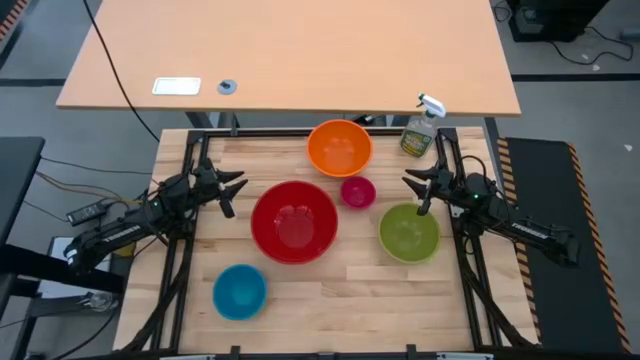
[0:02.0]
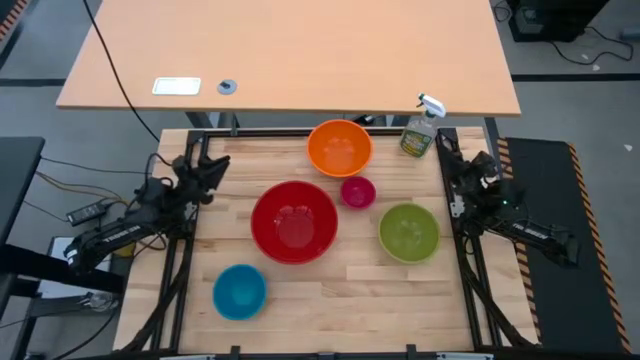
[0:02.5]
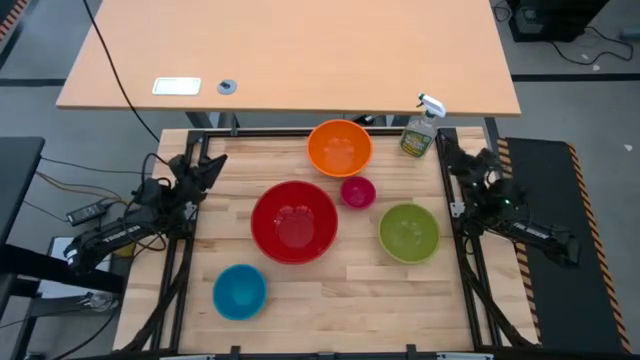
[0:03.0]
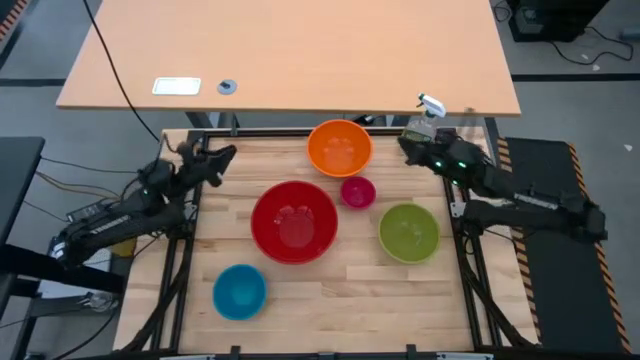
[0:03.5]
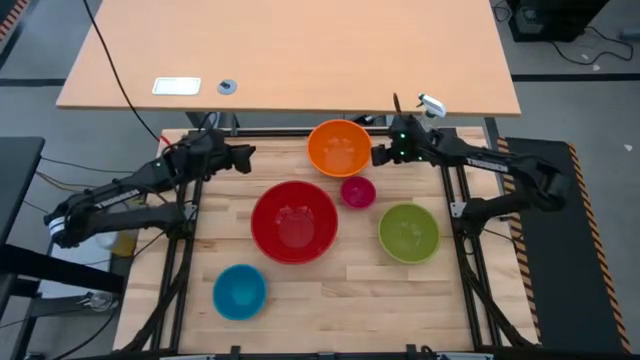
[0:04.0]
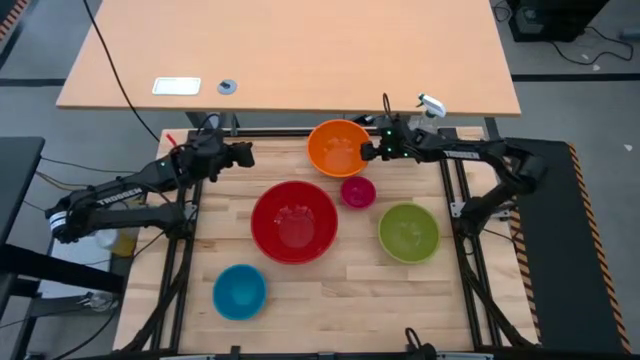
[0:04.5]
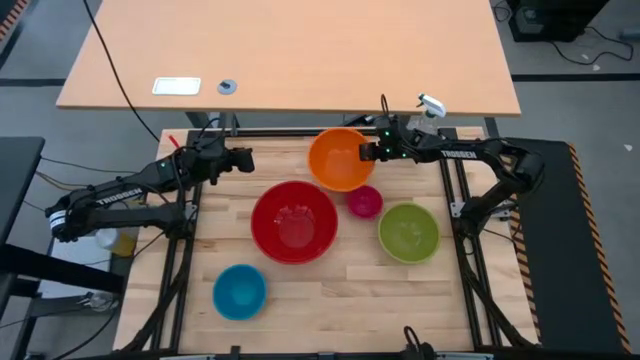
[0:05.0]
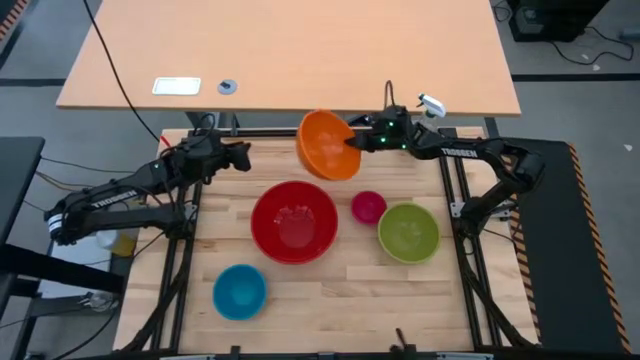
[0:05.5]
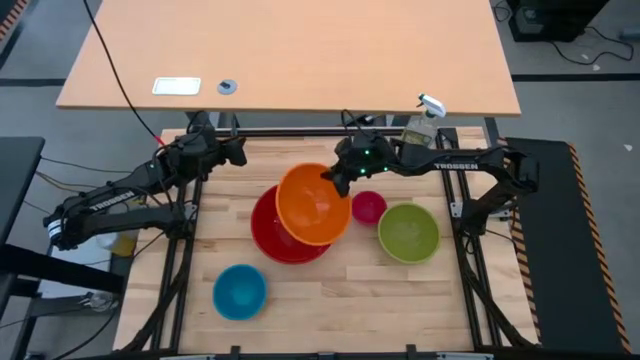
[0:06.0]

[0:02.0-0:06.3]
Stack the orange bowl on the red bowl

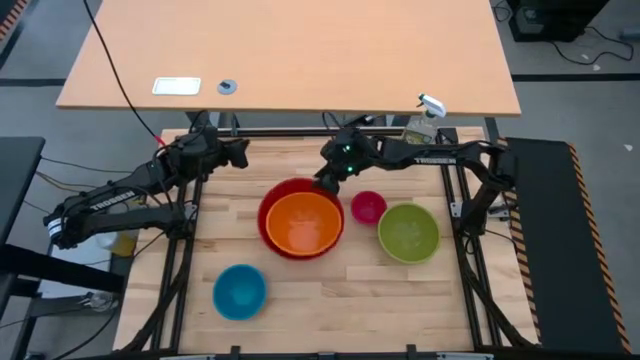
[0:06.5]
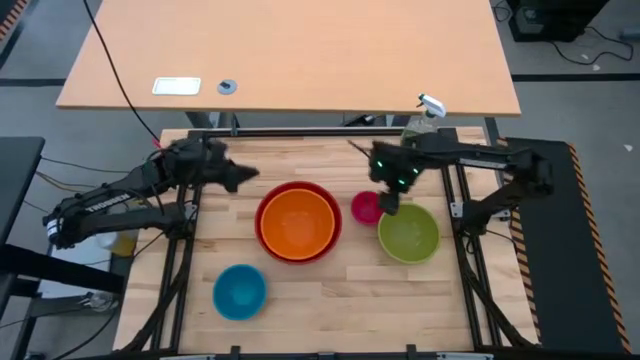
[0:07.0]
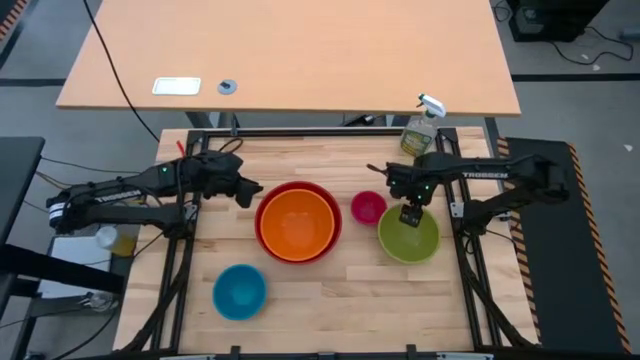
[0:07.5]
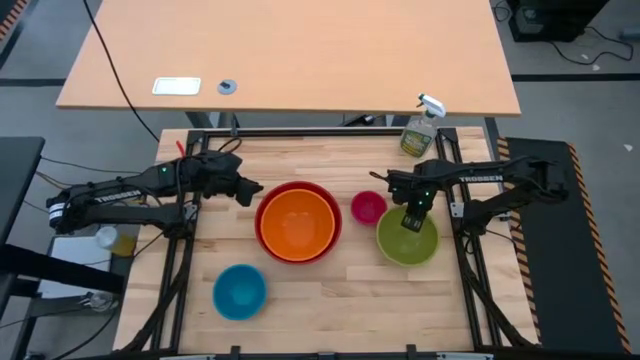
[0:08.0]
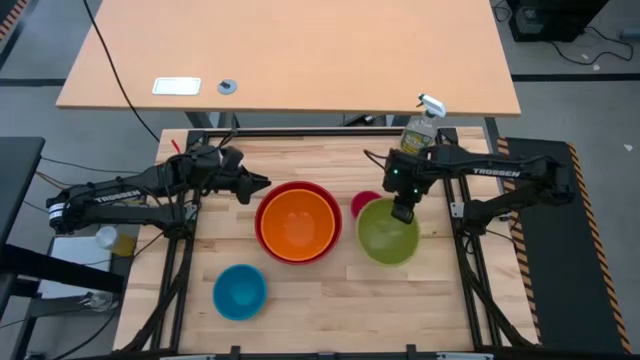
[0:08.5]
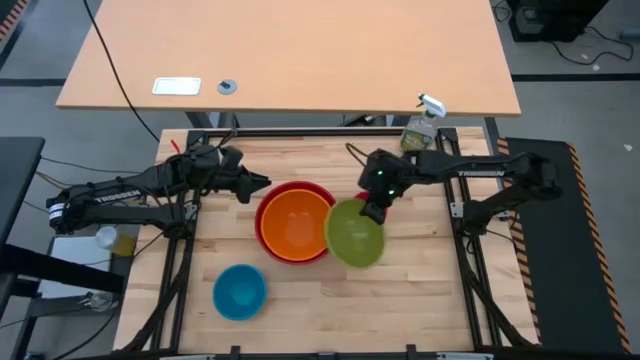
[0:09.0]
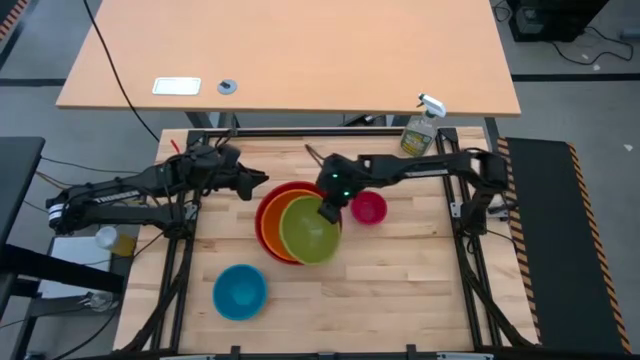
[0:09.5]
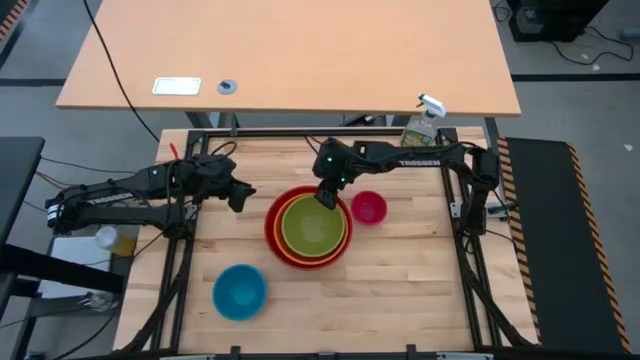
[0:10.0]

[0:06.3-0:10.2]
Stack the green bowl on the orange bowl

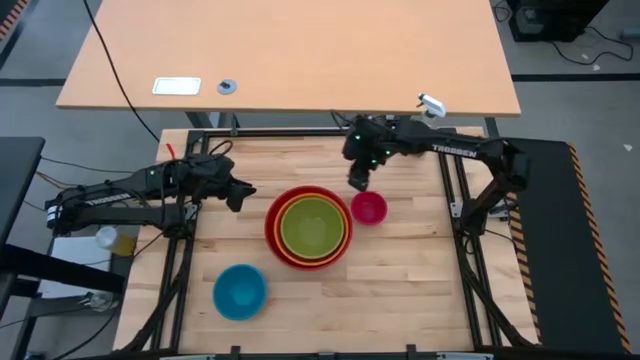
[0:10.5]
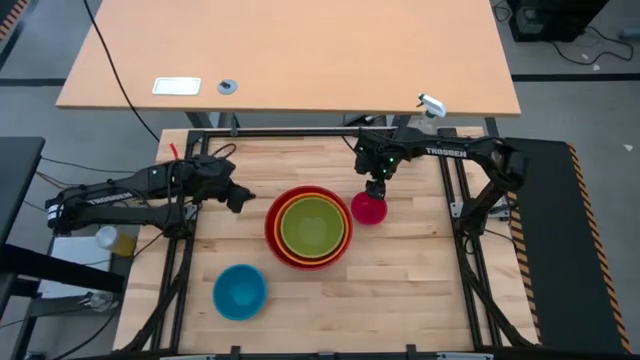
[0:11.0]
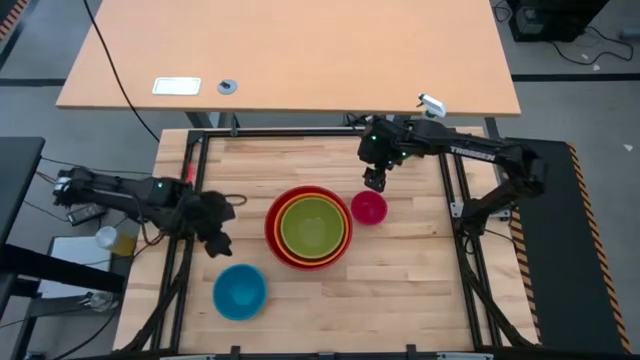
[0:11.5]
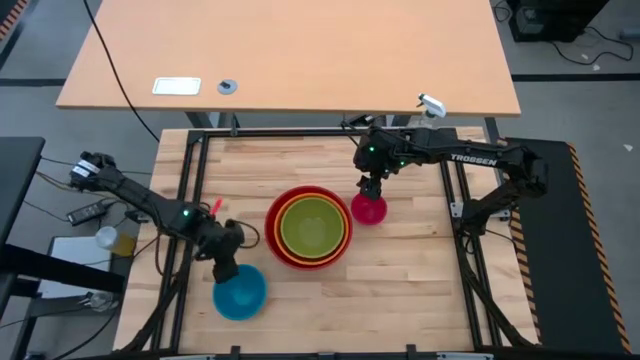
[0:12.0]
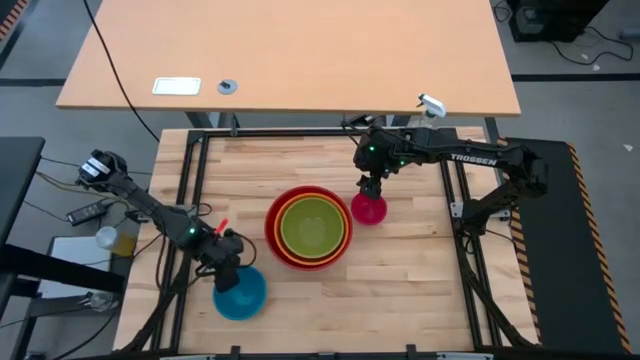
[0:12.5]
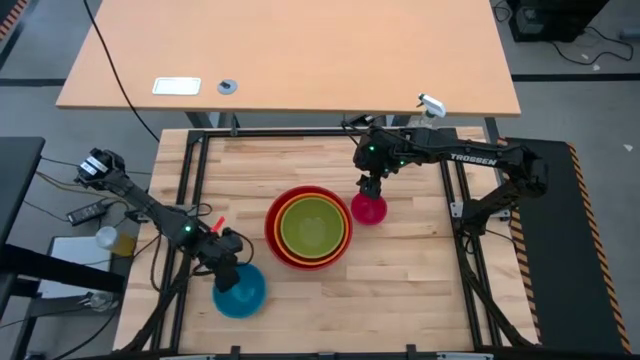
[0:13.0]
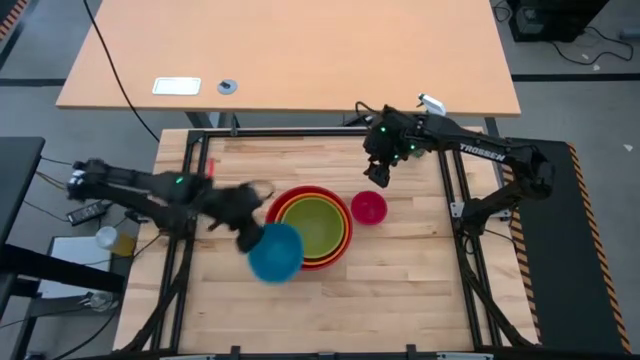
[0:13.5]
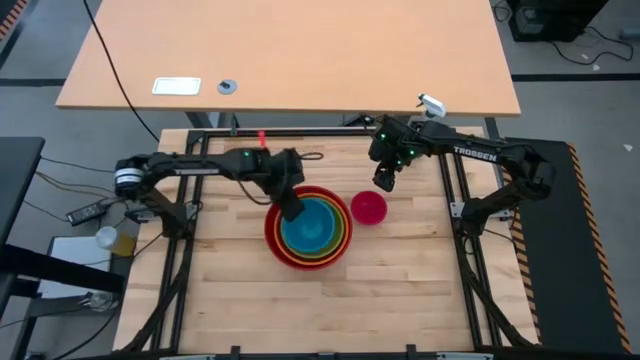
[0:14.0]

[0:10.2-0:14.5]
Stack the blue bowl on the green bowl

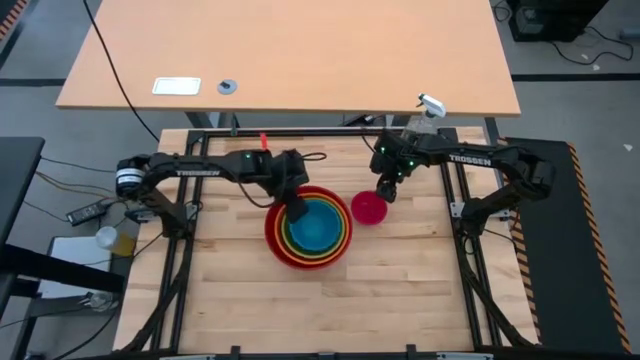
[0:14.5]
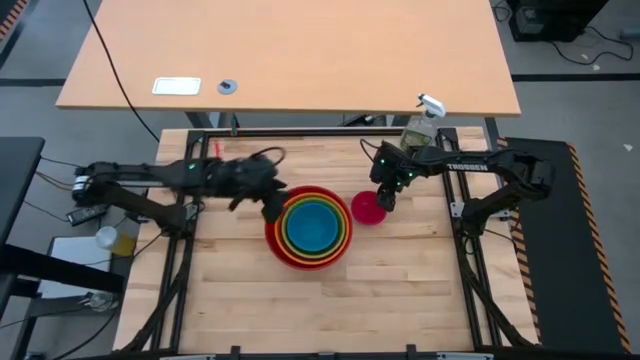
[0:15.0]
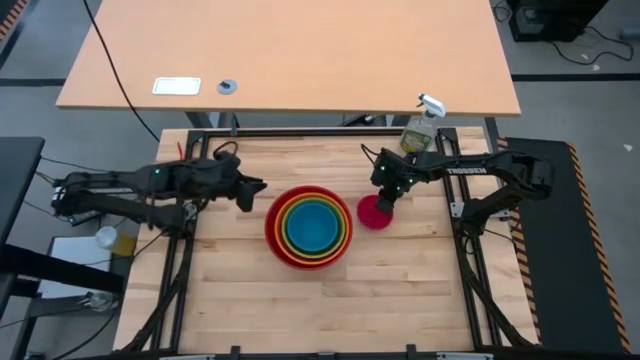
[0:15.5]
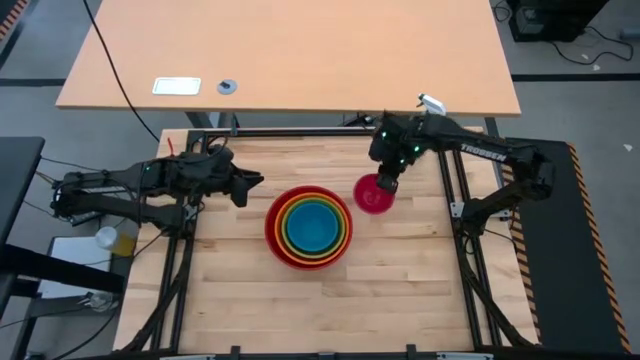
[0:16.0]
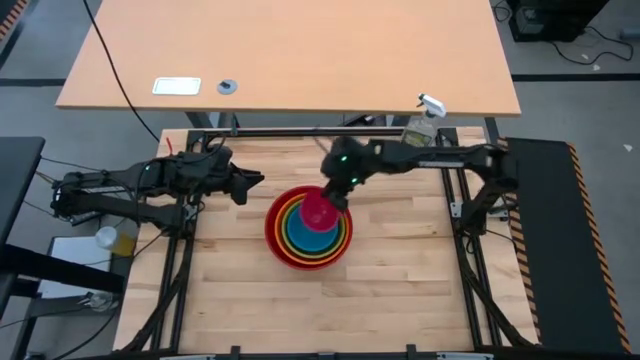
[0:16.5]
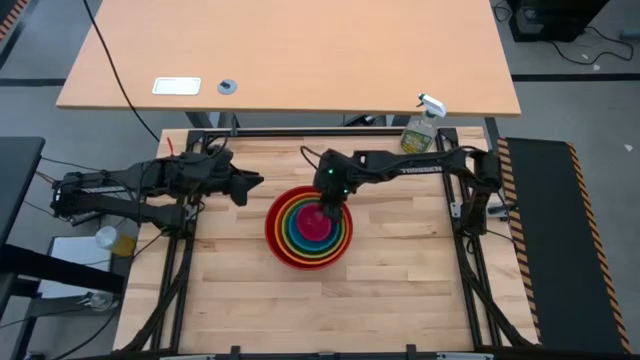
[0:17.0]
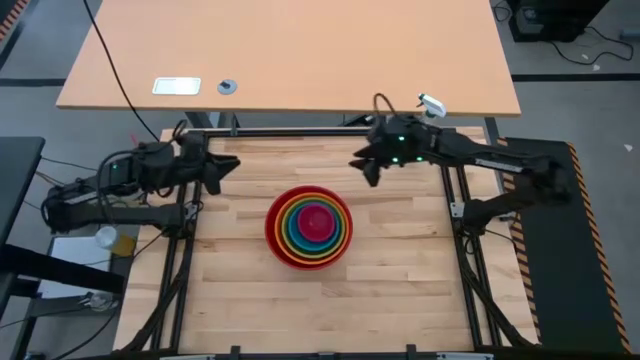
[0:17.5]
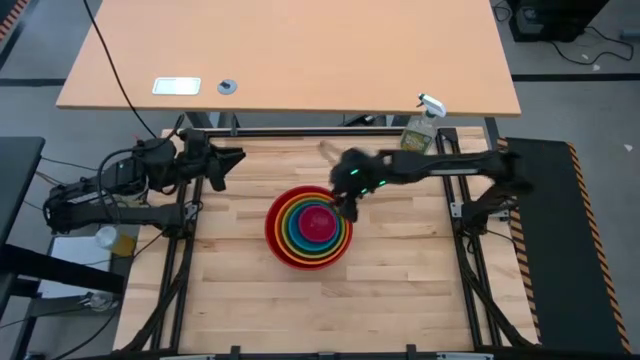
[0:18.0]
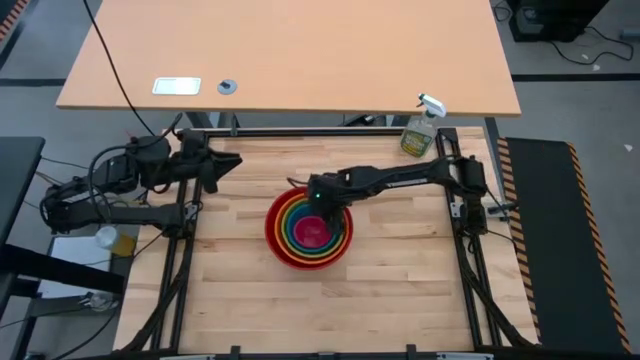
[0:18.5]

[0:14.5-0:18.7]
Stack the pink bowl on the blue bowl

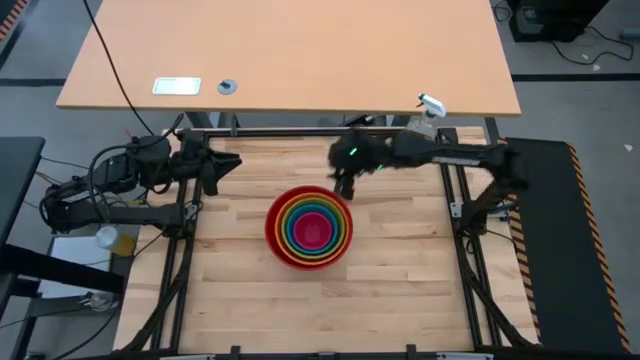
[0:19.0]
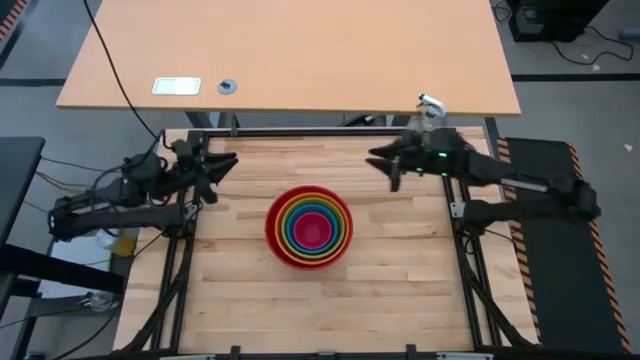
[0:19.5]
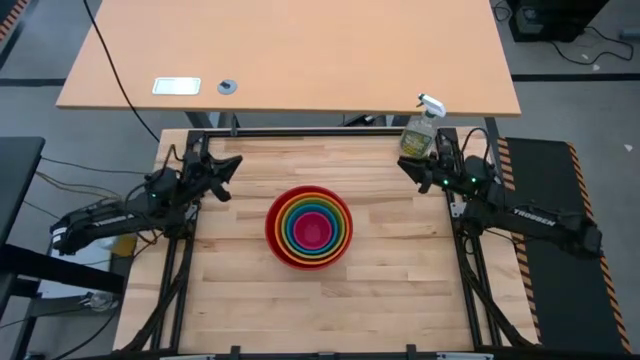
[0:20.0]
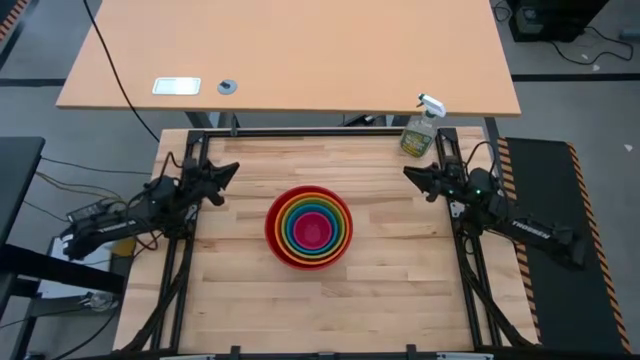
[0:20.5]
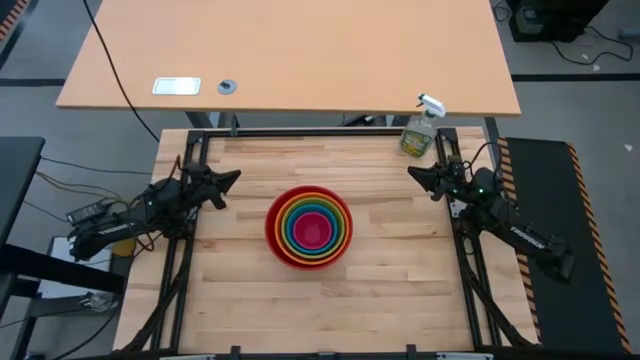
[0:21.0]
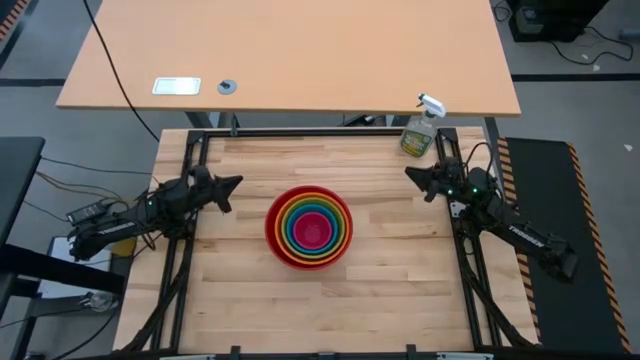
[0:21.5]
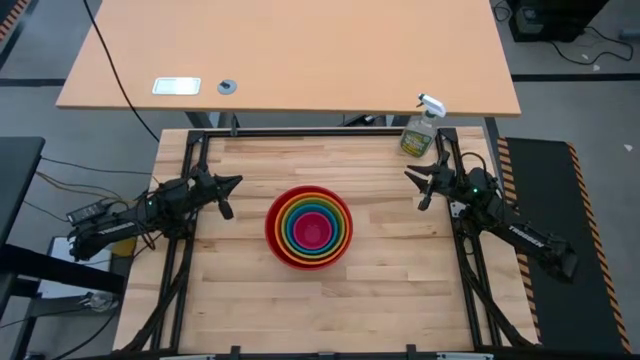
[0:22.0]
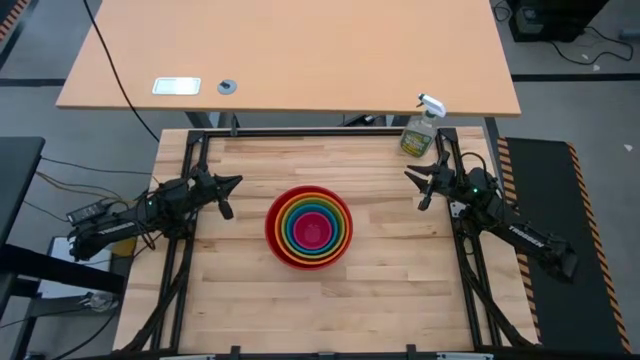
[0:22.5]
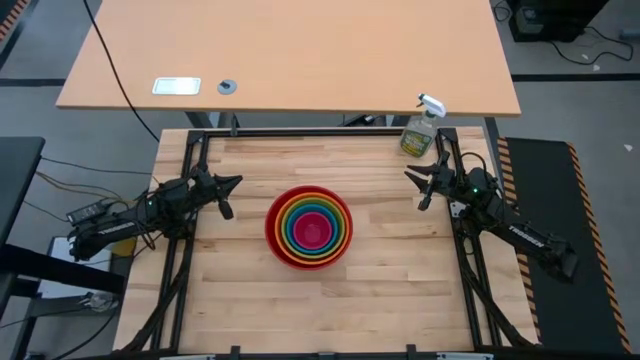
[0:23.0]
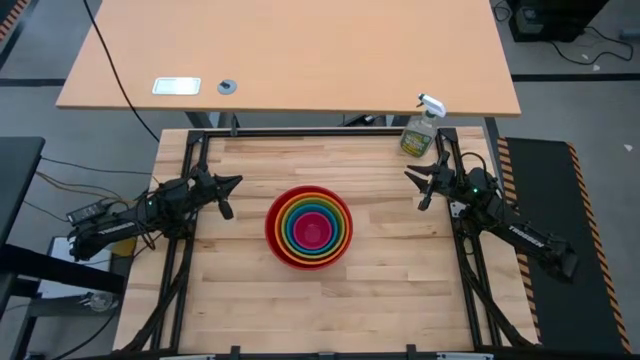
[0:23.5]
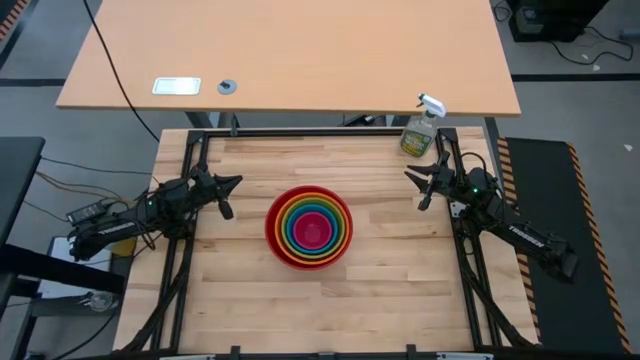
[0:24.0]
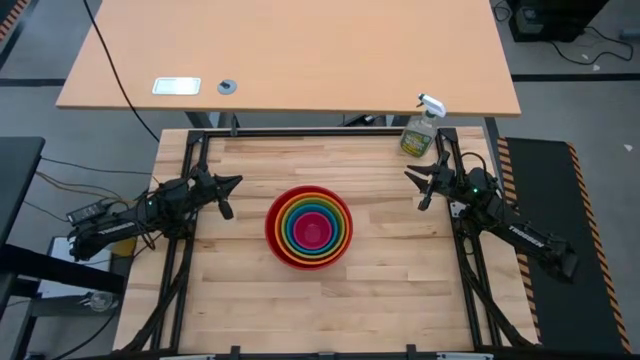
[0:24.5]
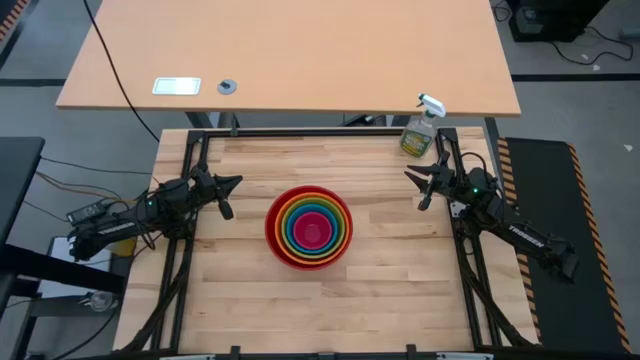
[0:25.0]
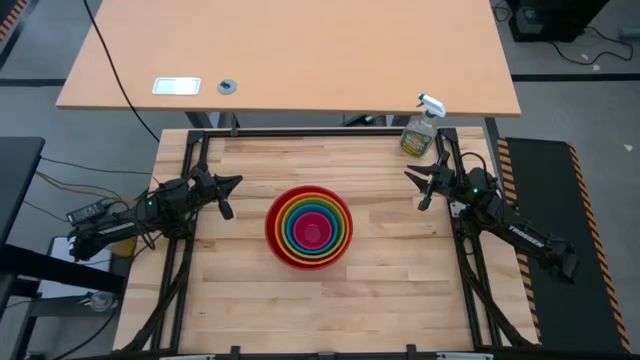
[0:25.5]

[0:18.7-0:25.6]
Return to Home Position
